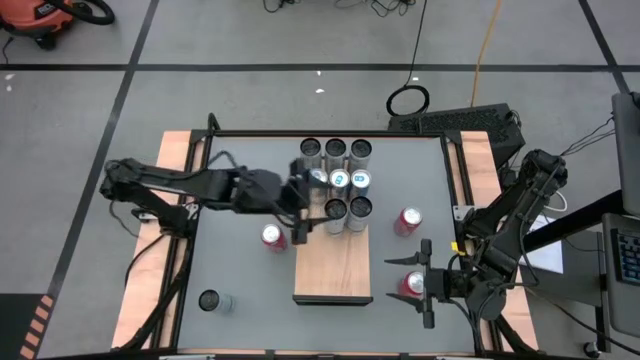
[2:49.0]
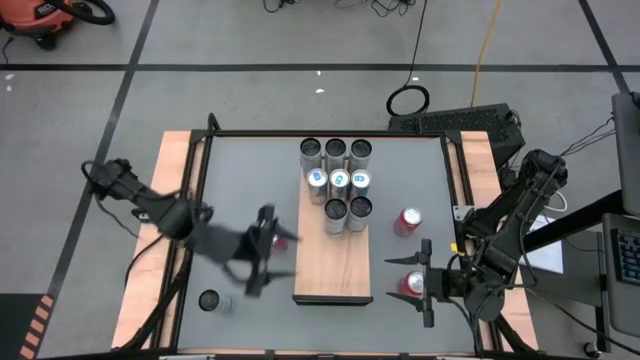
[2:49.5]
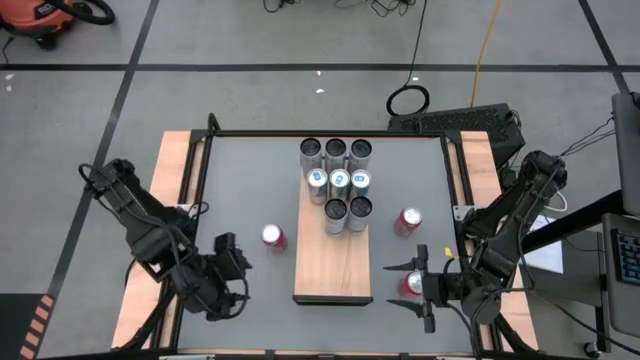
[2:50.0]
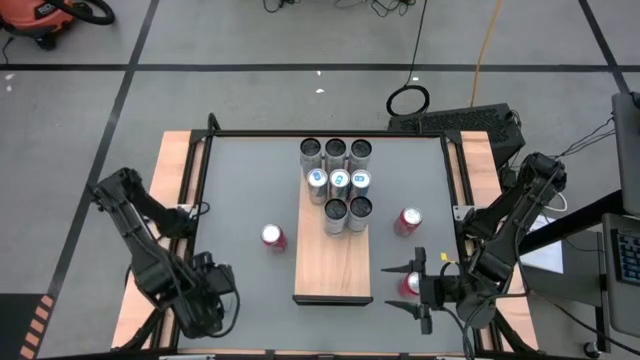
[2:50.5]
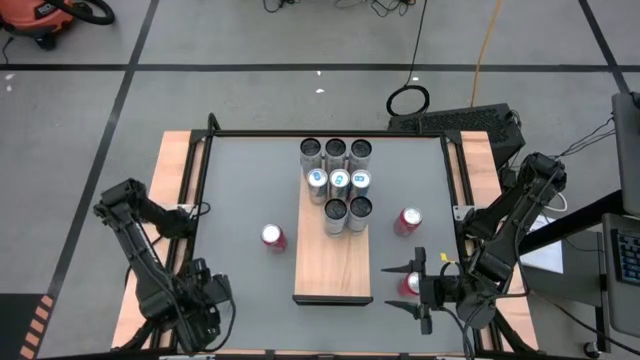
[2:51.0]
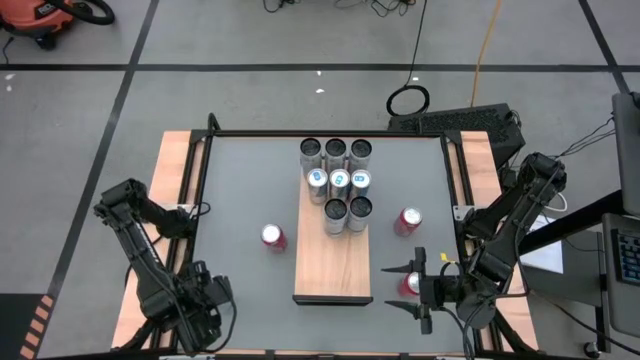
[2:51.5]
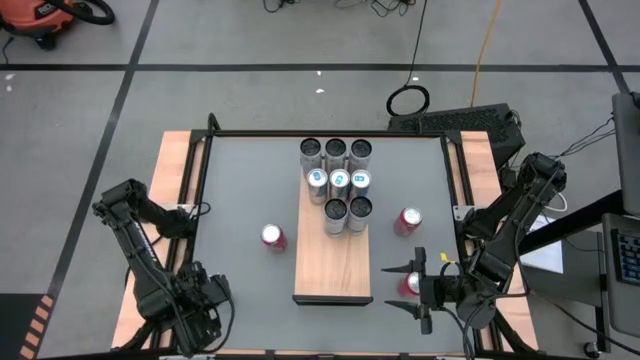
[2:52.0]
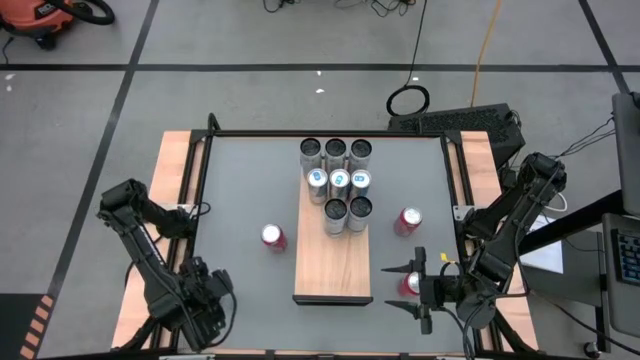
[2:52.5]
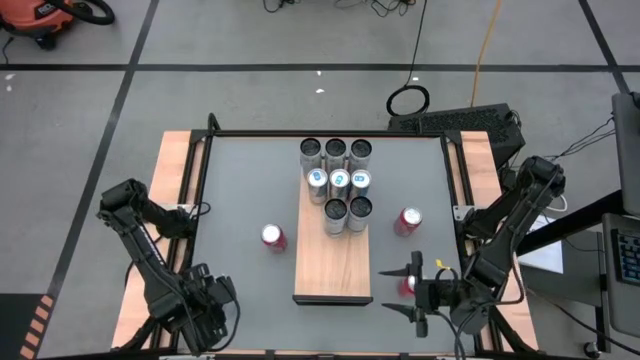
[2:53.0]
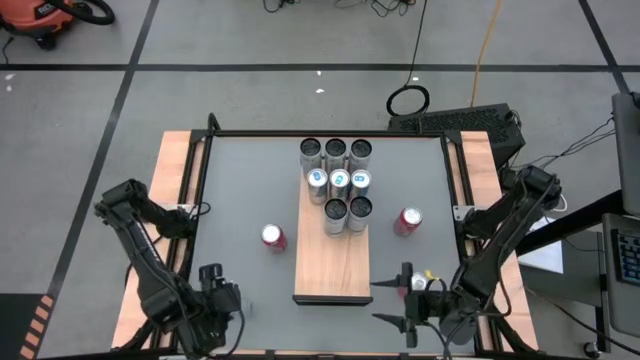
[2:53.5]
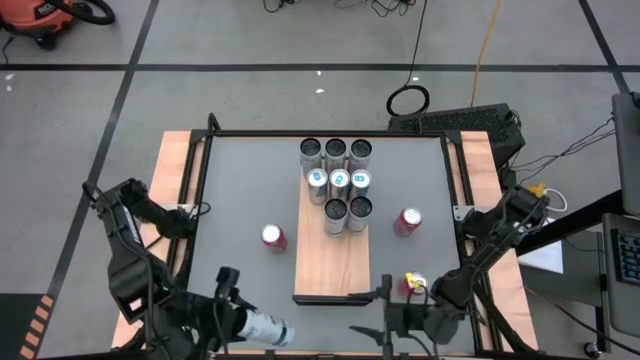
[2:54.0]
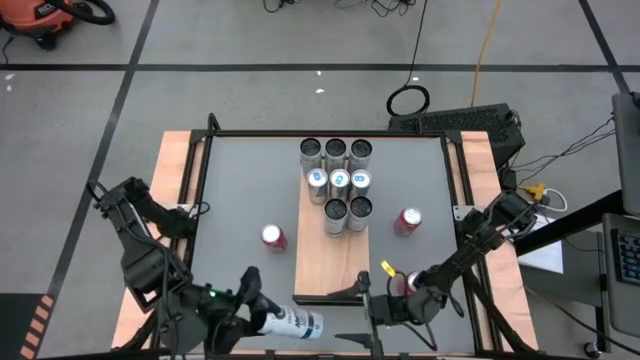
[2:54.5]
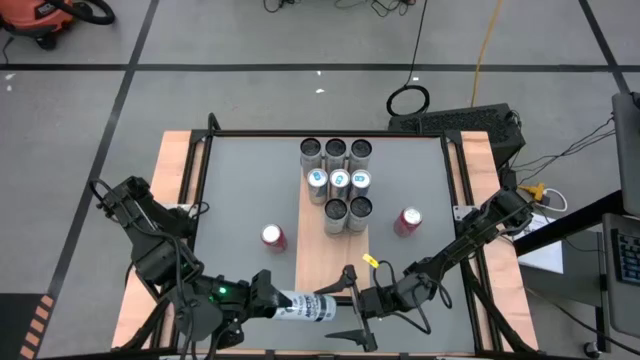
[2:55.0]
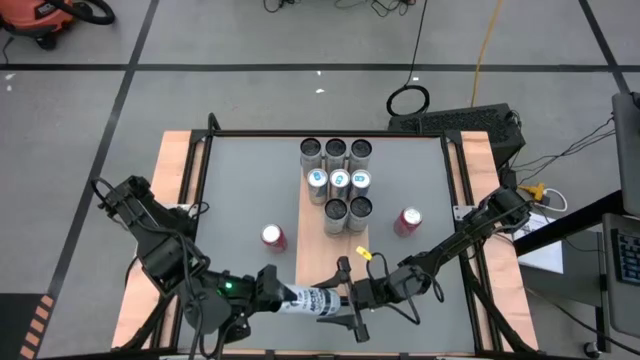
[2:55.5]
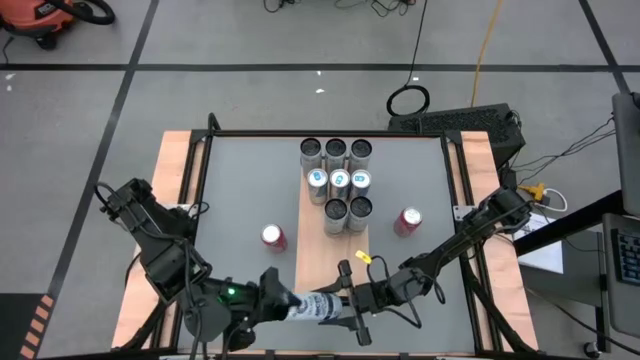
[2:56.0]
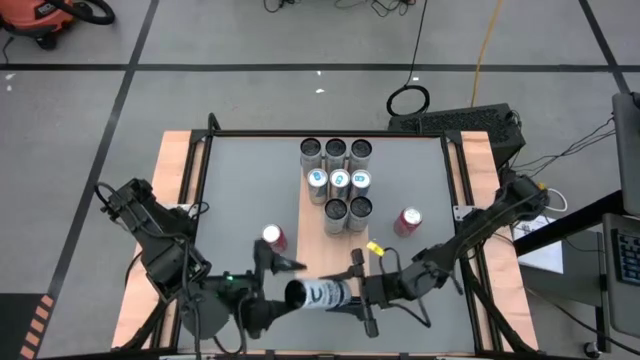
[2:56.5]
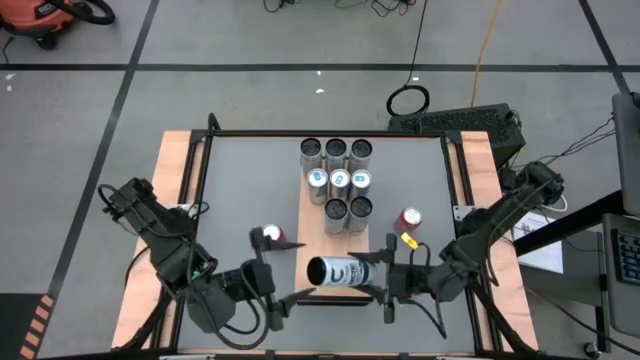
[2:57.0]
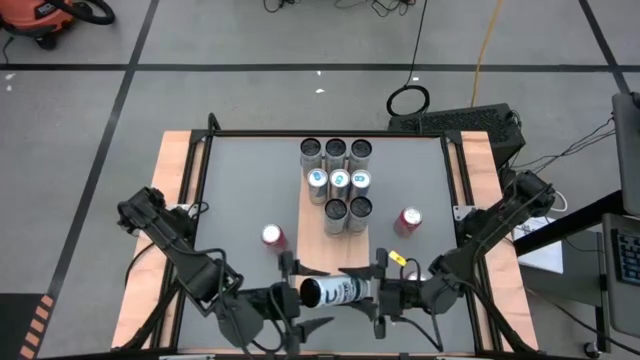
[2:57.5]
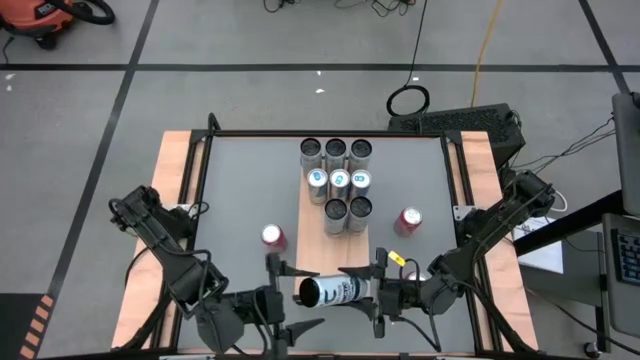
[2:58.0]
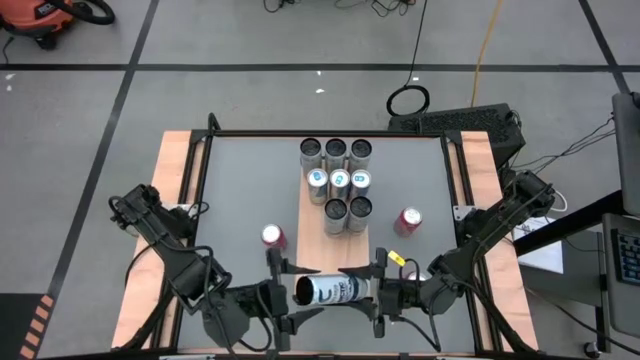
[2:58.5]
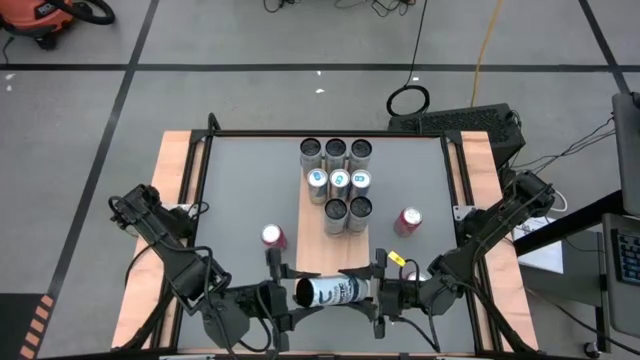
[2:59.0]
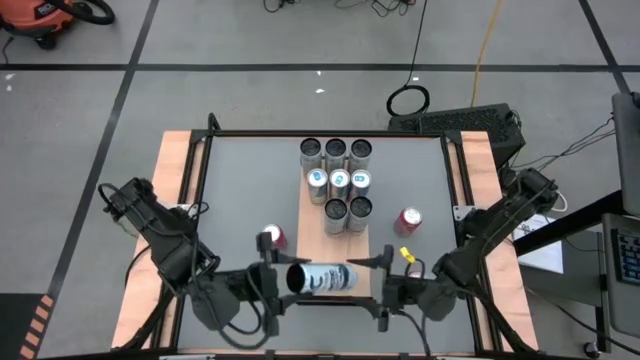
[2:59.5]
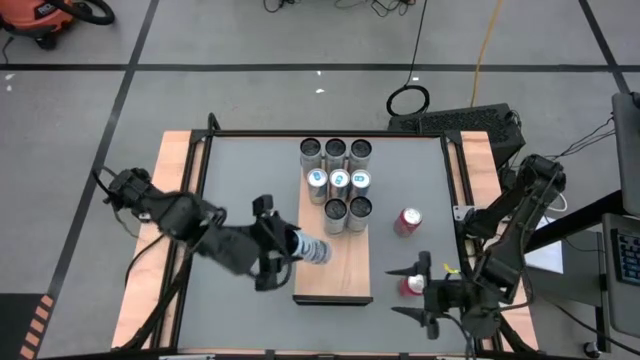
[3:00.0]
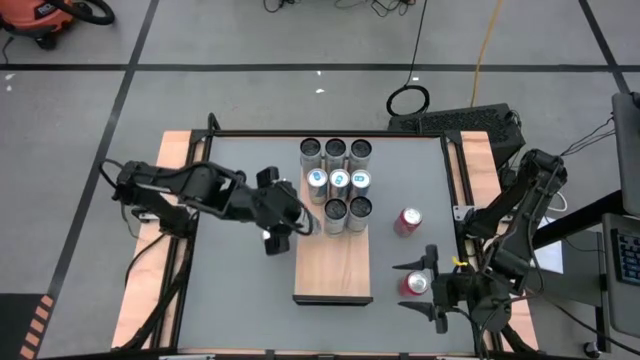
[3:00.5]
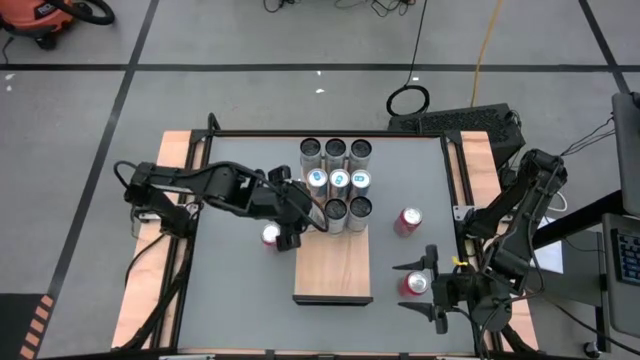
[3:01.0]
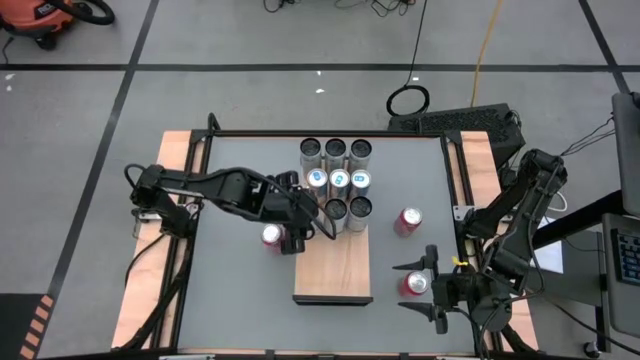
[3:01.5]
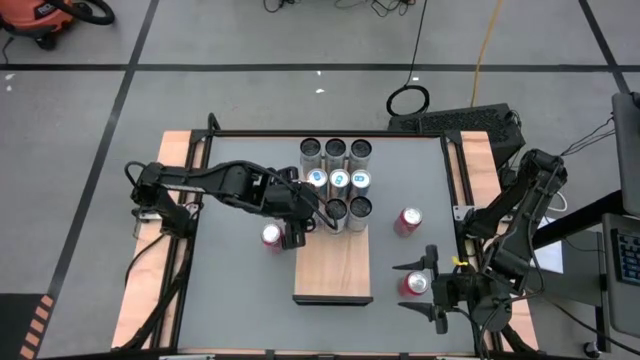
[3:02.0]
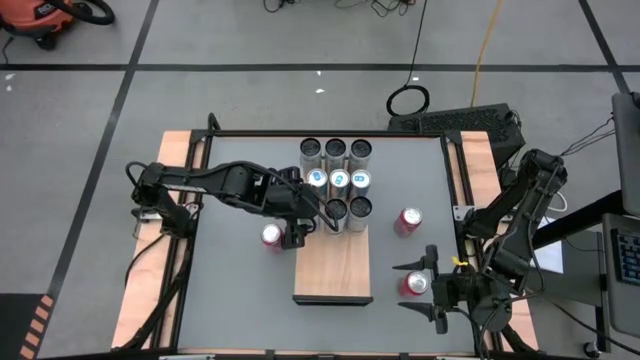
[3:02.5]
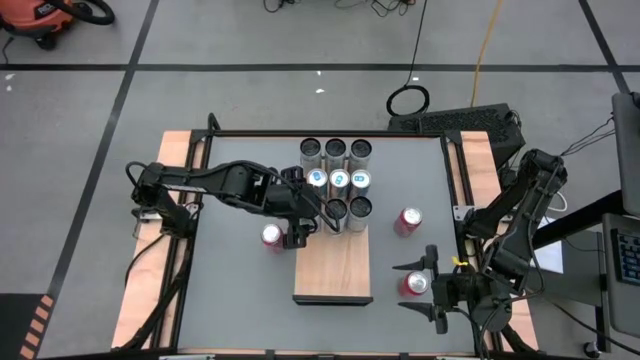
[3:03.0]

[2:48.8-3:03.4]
Task: Place canned beverage on shelf
Put the white blue soda can on the shelf aligned with the other white blue soda cans

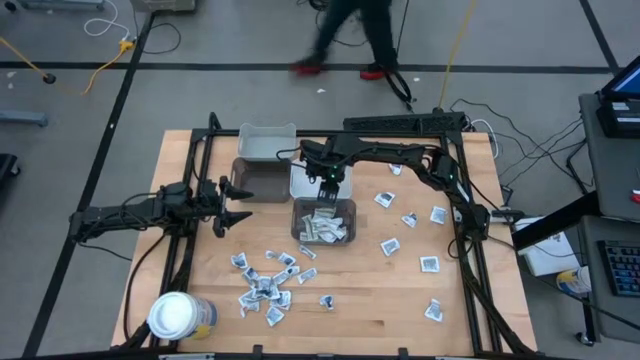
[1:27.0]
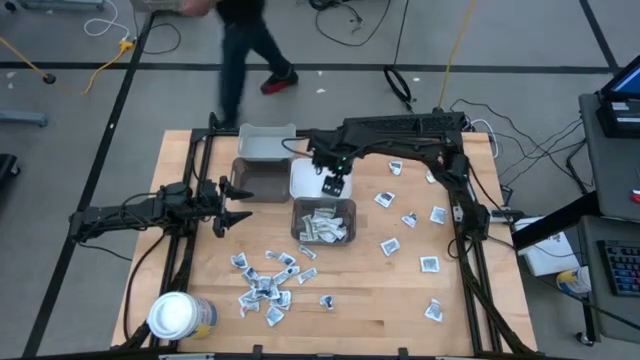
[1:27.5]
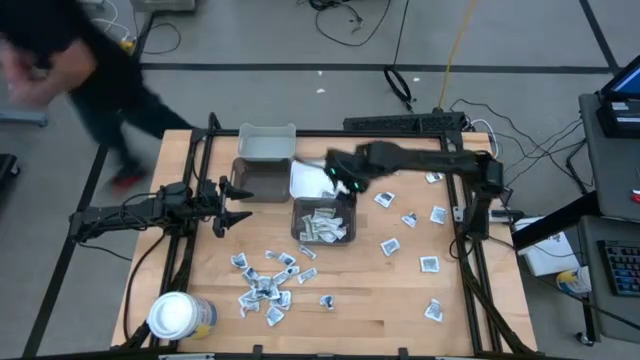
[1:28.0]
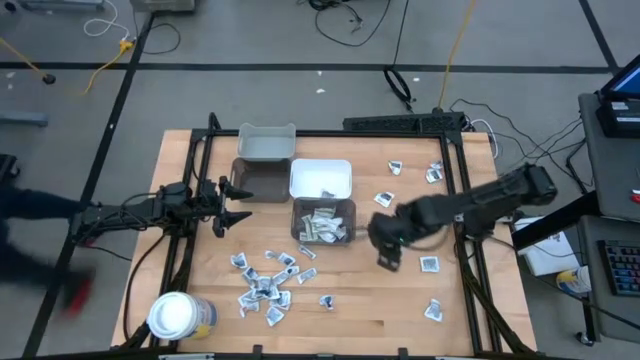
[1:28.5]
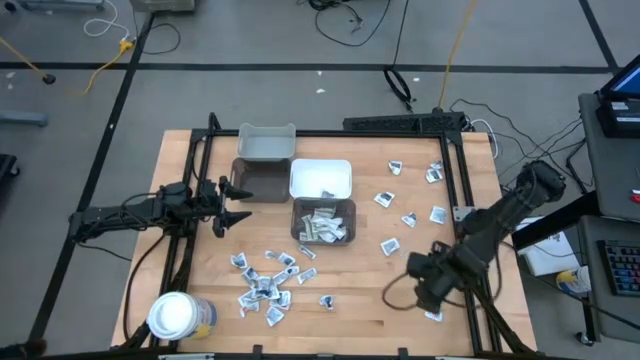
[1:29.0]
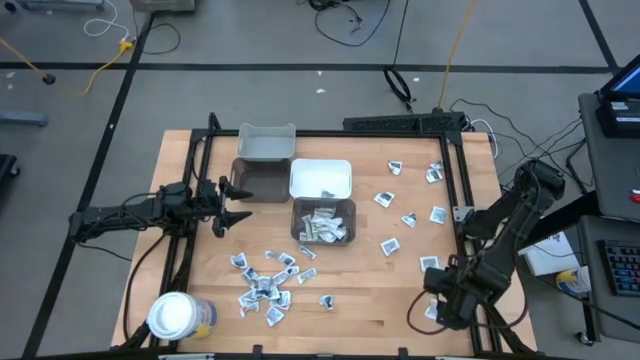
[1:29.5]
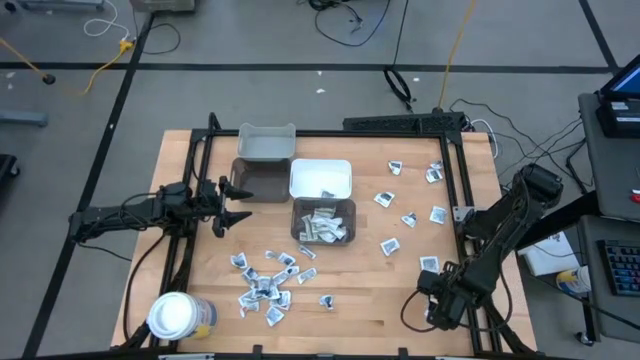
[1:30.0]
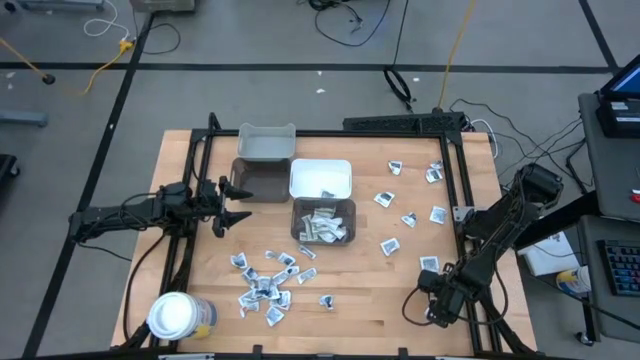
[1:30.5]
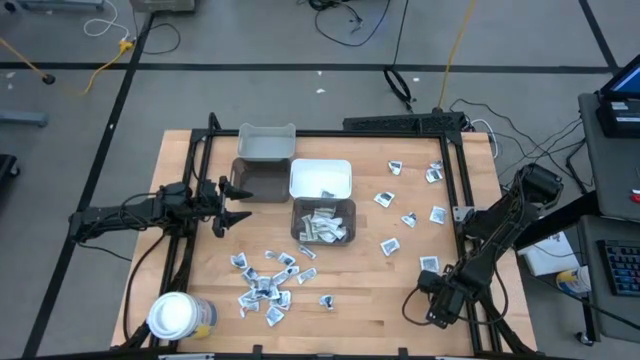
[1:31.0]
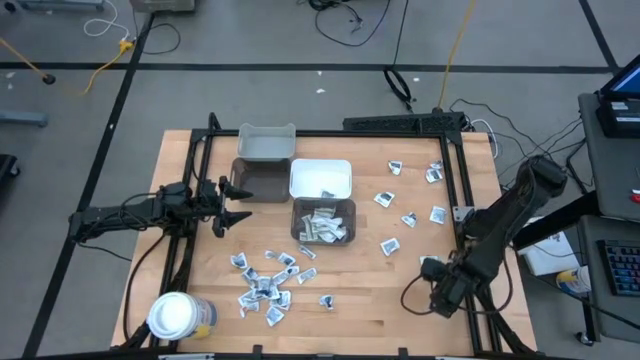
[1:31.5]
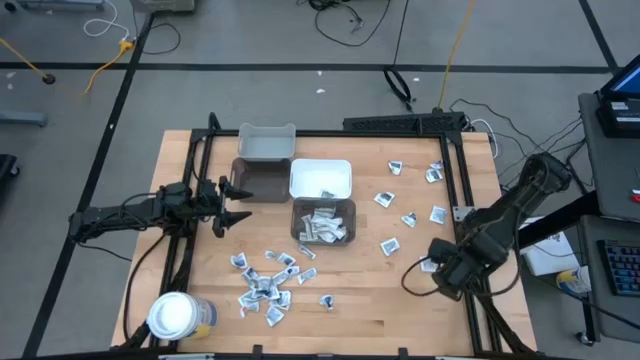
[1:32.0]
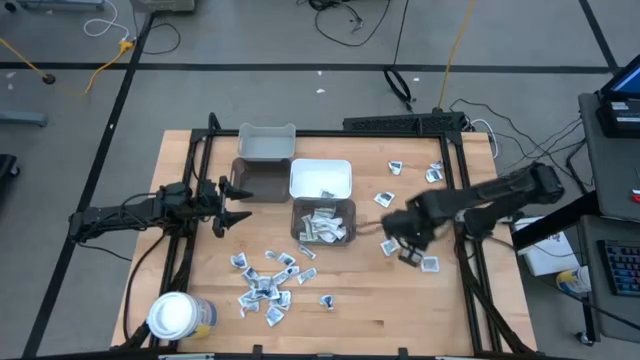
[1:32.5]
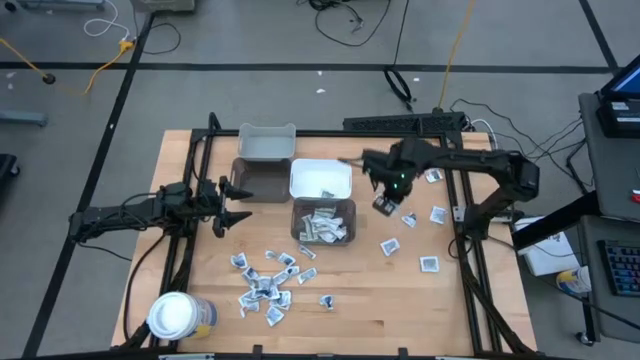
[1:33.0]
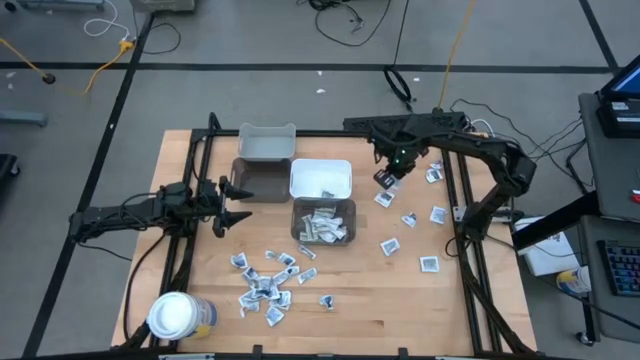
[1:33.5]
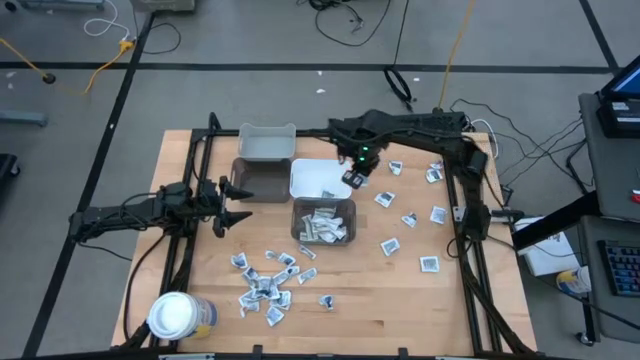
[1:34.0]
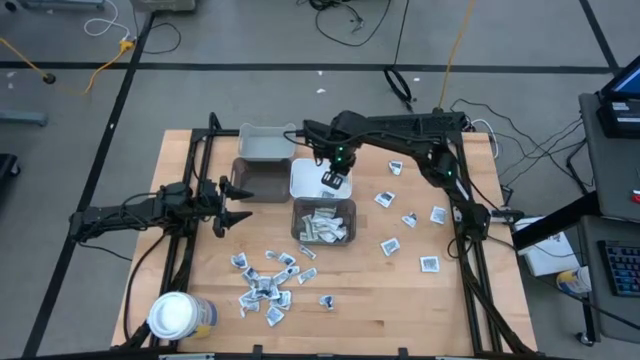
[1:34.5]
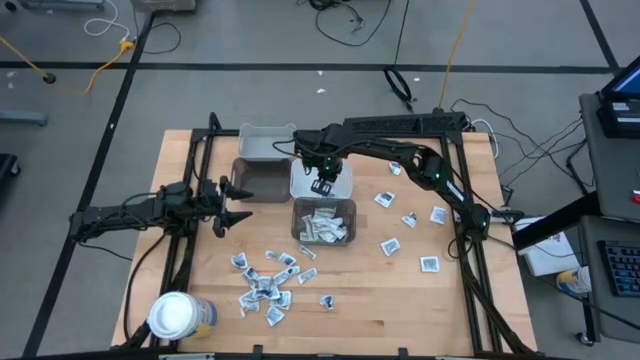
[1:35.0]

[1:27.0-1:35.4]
Task: Pick & Place First Aid Supplies
Put the gray towelette pack into the white bin
